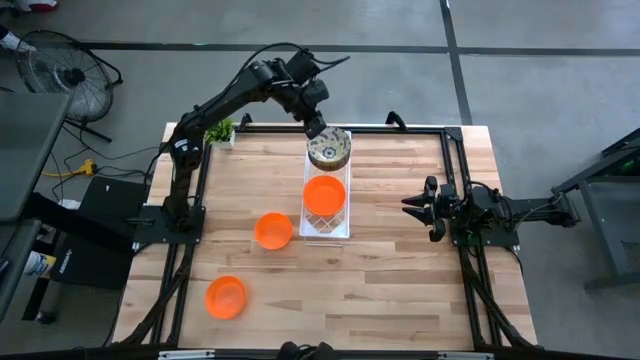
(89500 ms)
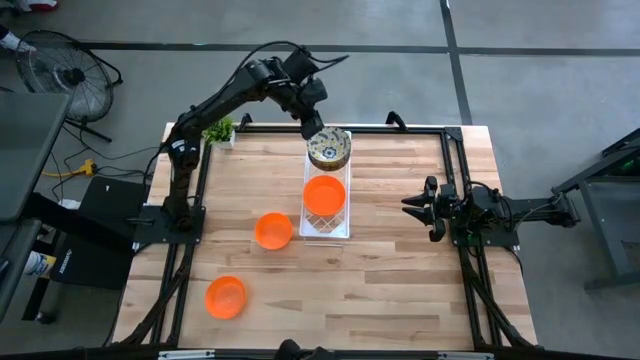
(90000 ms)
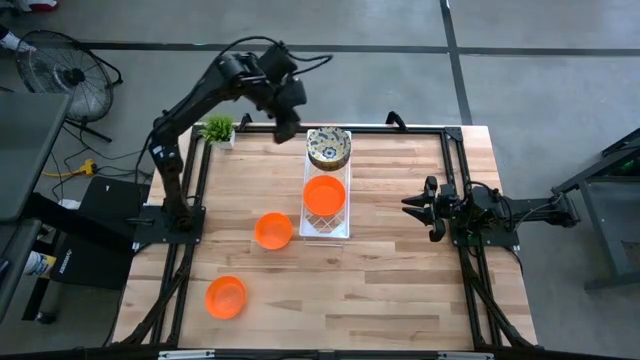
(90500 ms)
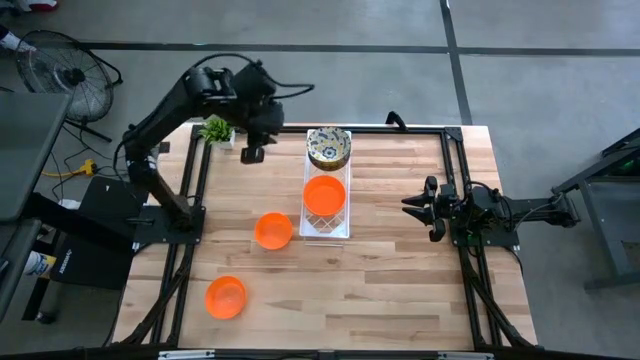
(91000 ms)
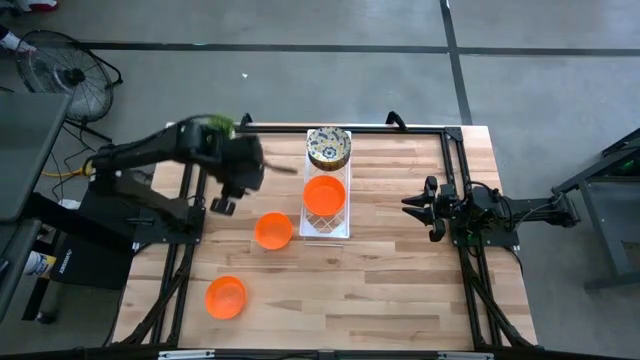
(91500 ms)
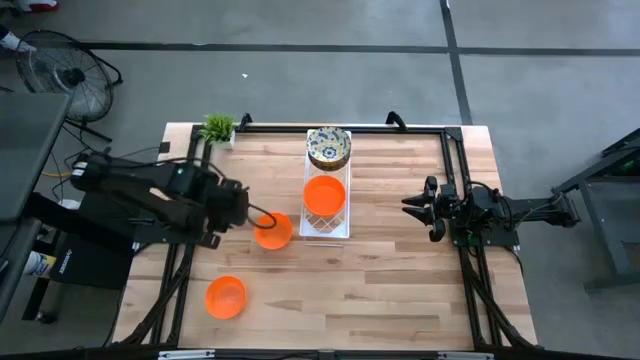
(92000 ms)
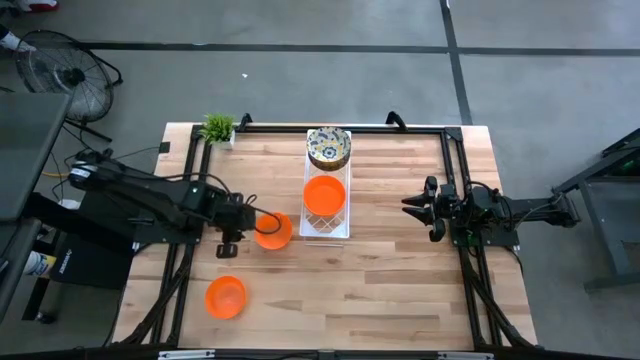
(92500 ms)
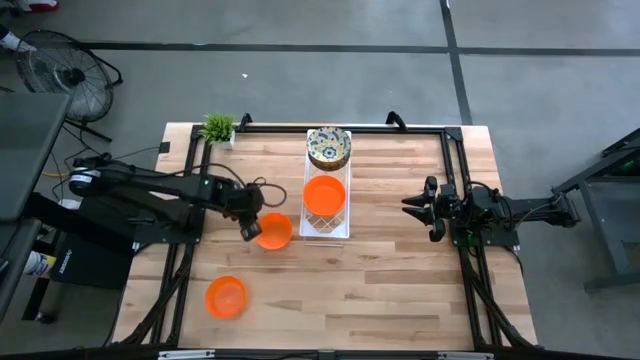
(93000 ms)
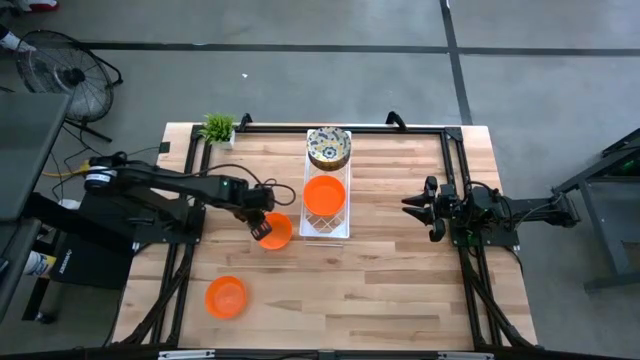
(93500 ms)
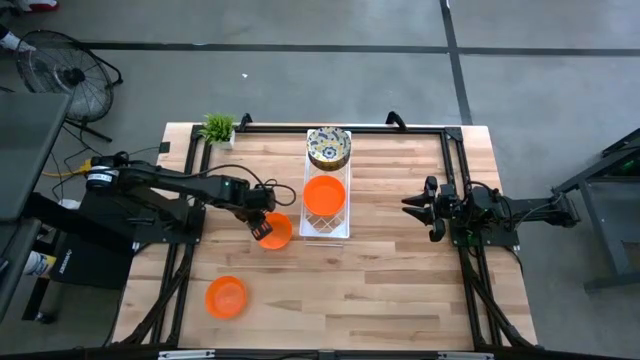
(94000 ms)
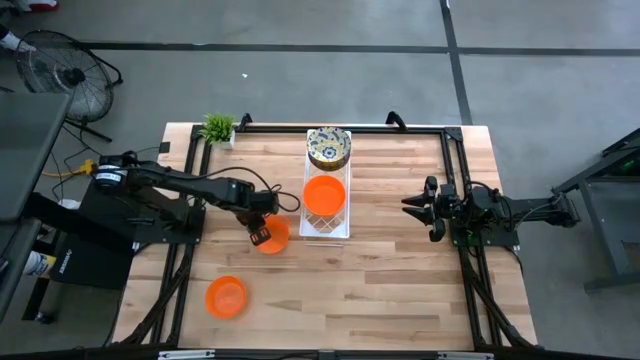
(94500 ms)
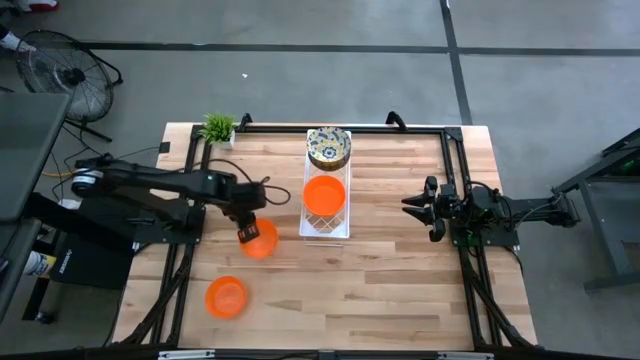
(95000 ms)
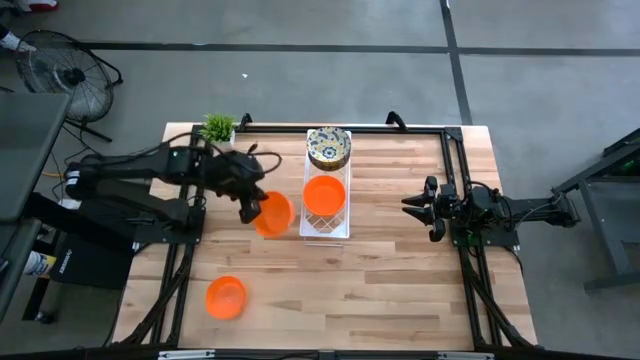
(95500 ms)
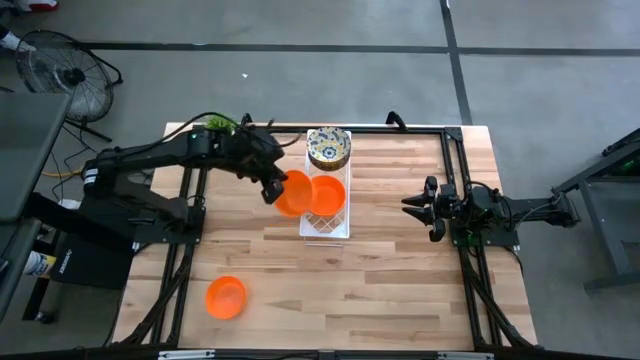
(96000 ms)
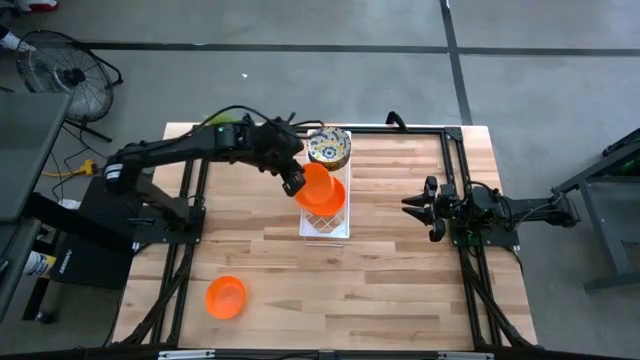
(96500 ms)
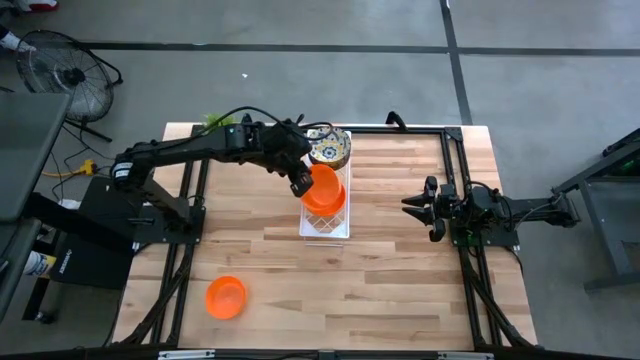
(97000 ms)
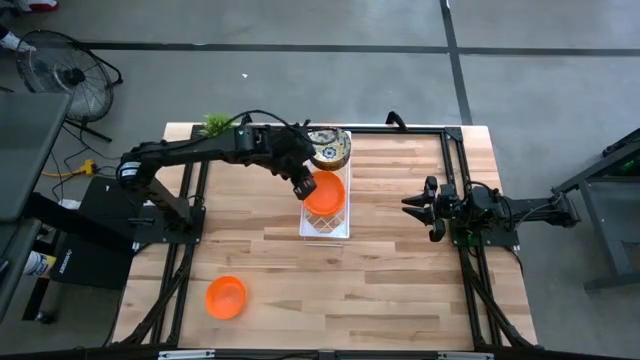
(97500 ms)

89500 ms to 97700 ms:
Task: Pick & Place Mini bowls
Stack the orange bowl on top of the orange bowl on the shelf

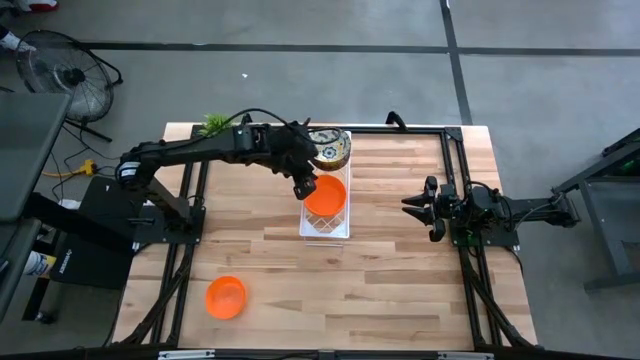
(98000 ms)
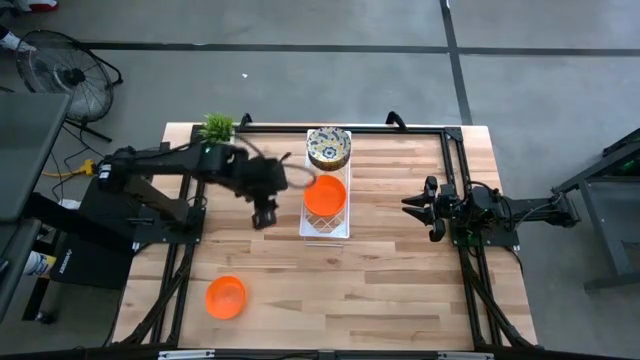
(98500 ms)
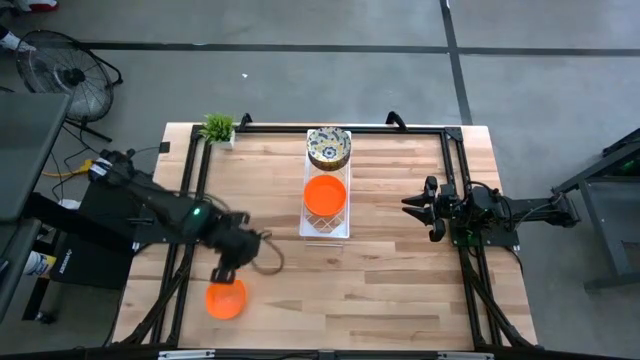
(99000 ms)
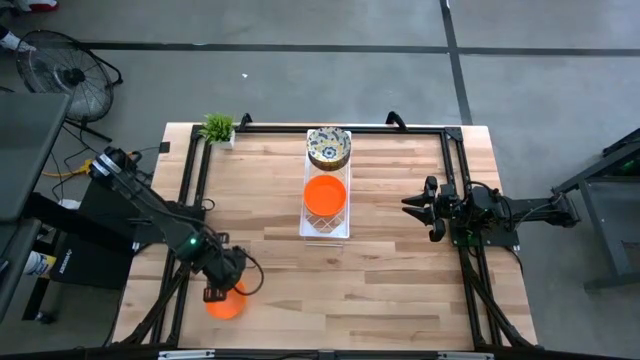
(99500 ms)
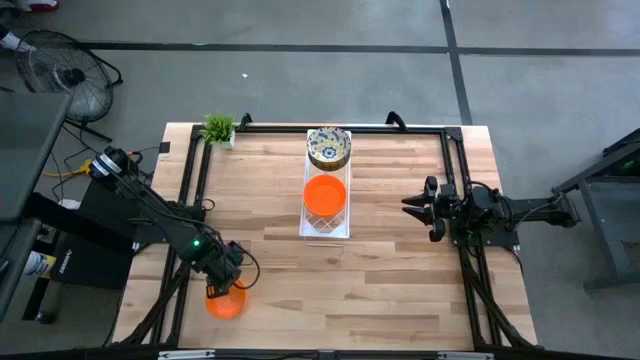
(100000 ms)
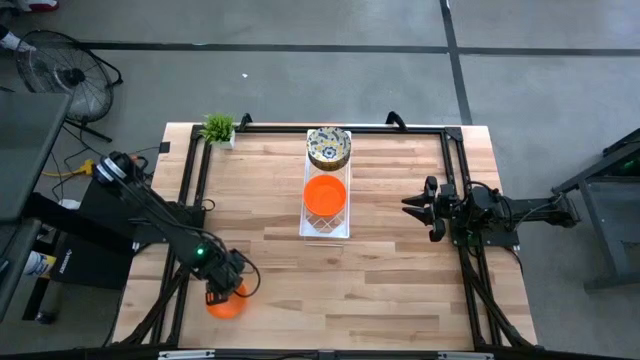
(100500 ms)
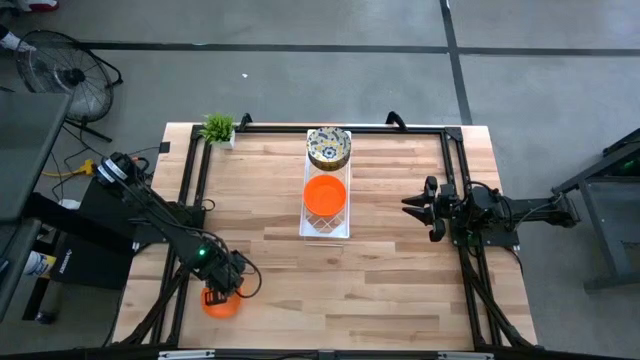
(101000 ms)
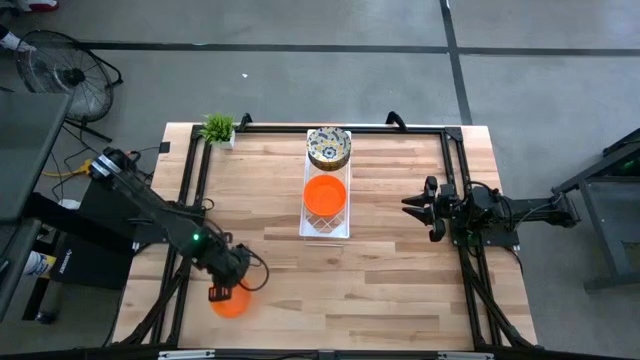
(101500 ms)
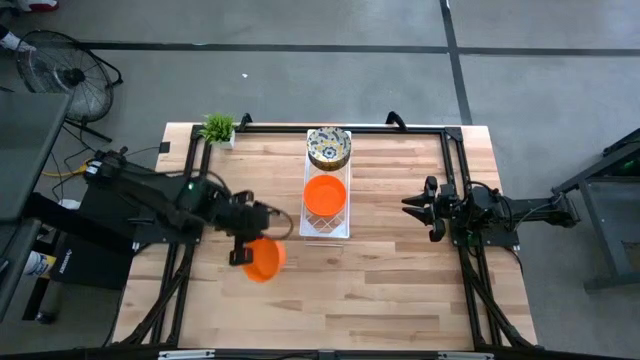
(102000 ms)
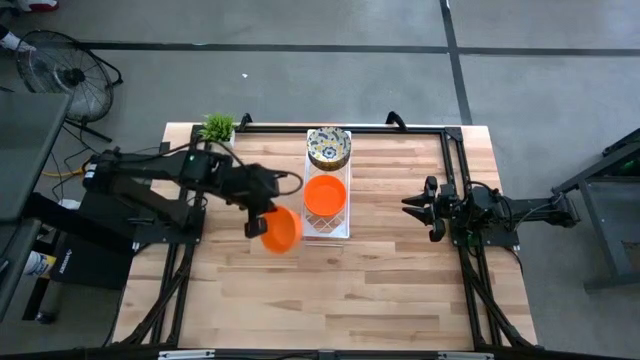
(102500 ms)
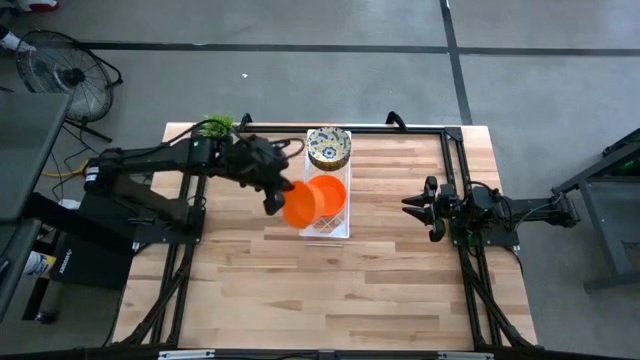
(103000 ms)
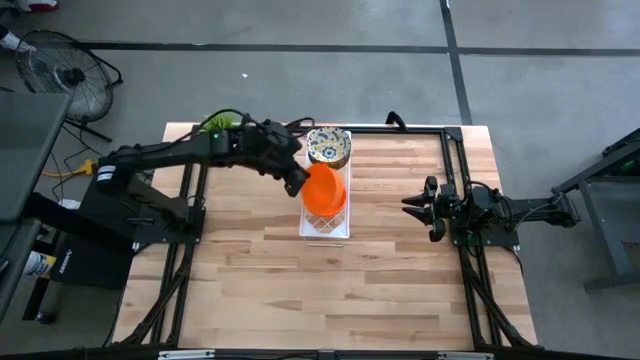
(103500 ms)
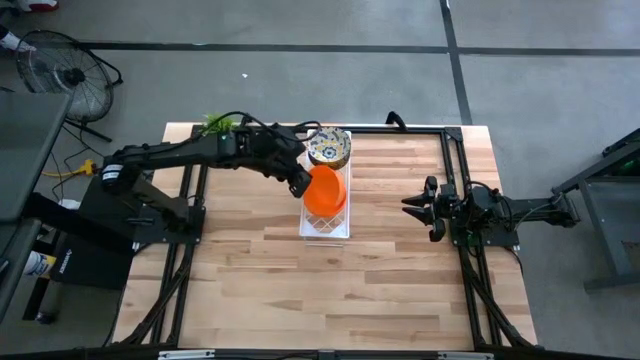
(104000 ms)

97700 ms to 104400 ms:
Stack the orange bowl on top of the orange bowl on the shelf

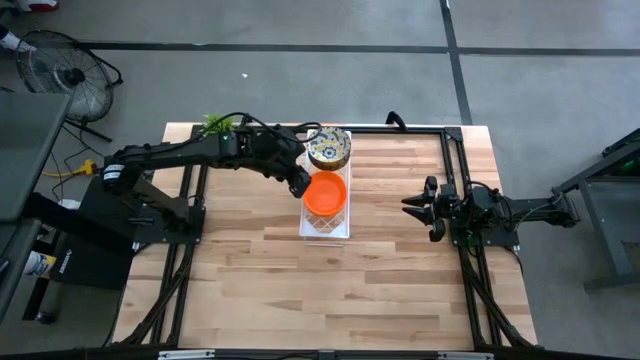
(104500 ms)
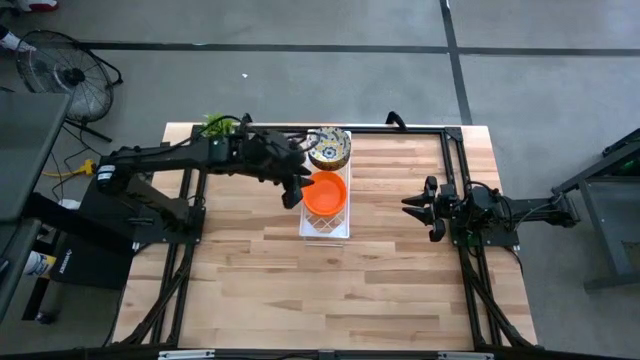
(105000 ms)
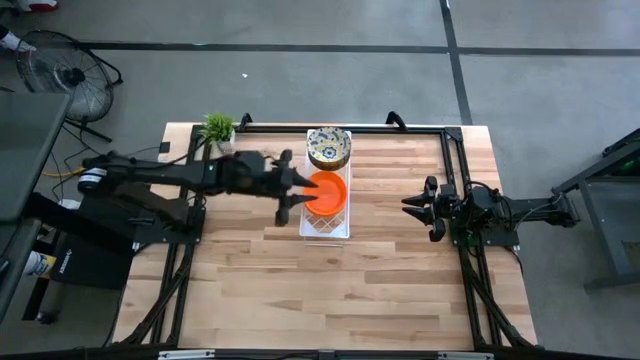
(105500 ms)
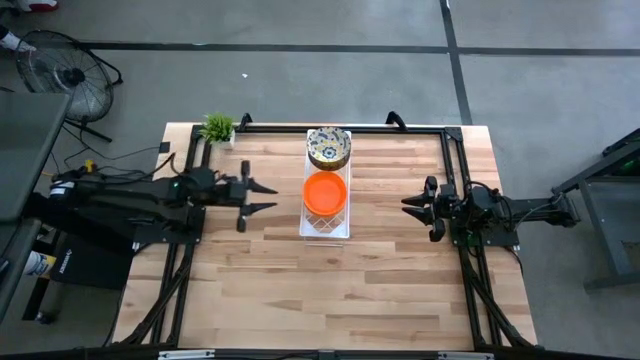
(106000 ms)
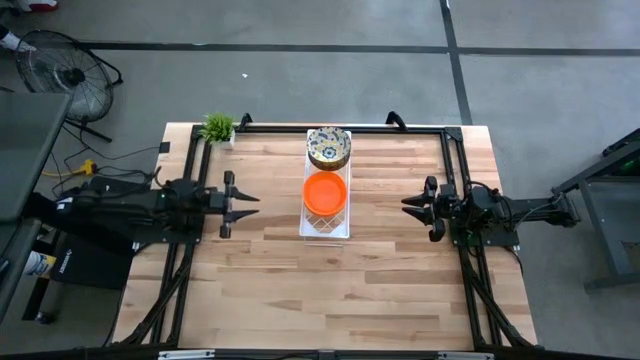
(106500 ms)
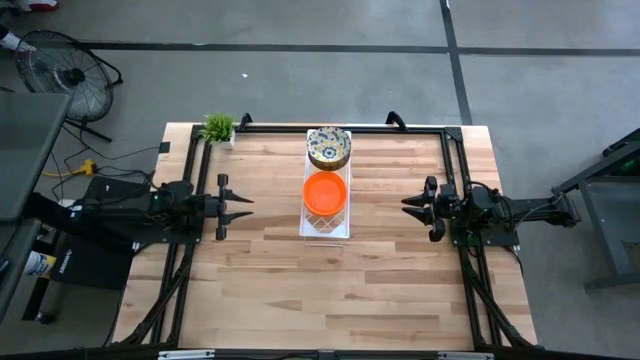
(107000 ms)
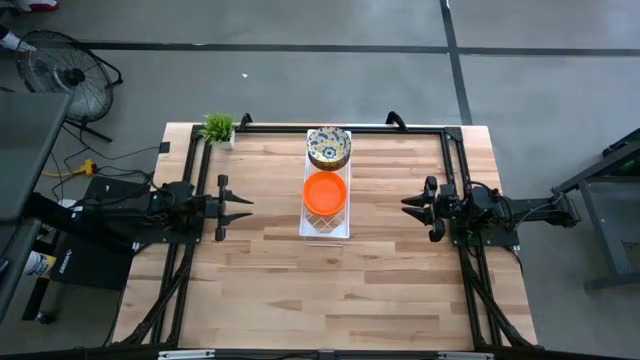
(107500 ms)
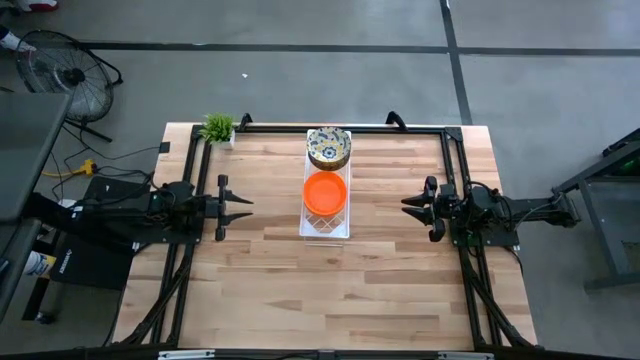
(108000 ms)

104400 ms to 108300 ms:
Return to Home Position

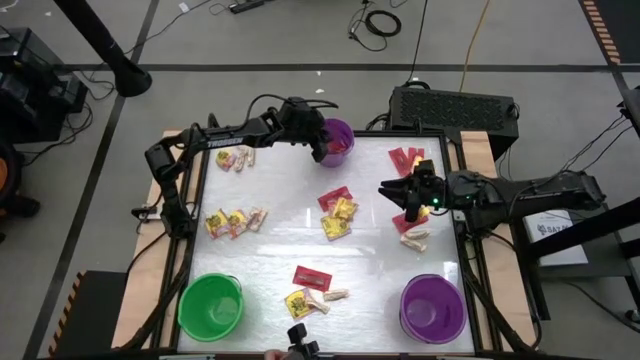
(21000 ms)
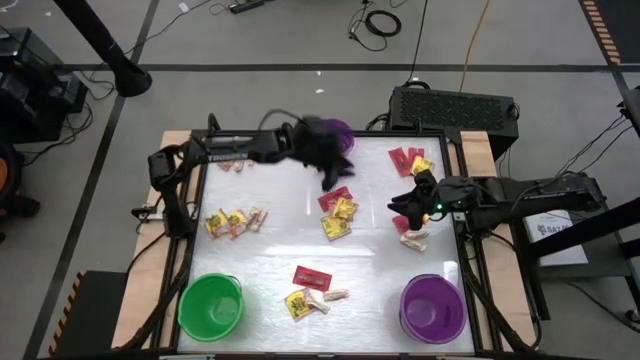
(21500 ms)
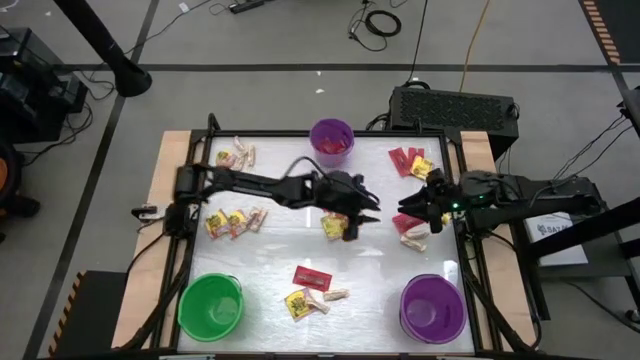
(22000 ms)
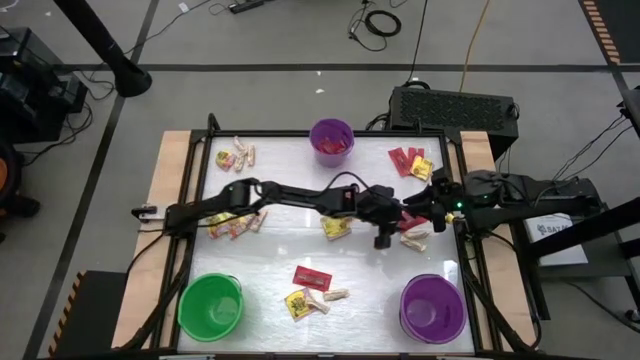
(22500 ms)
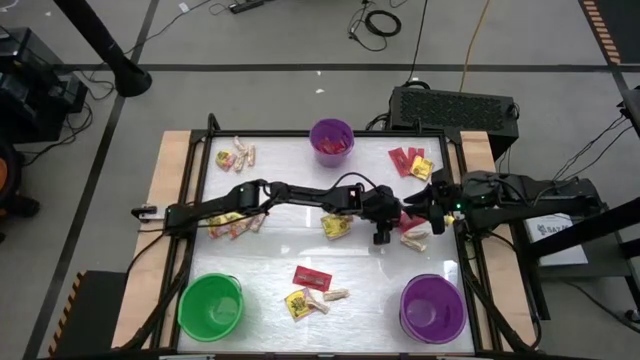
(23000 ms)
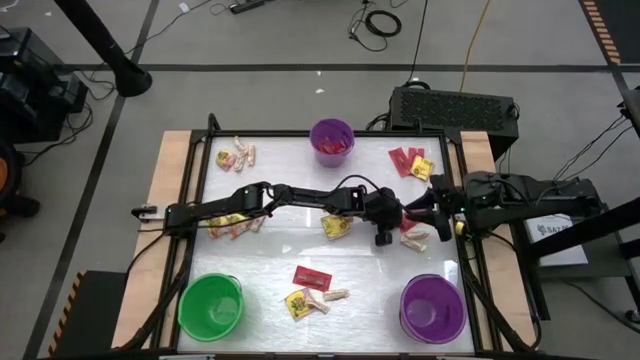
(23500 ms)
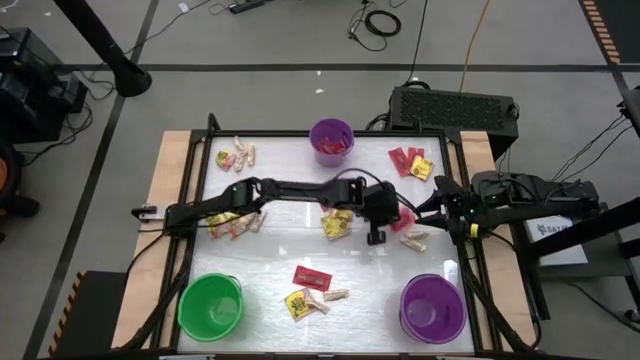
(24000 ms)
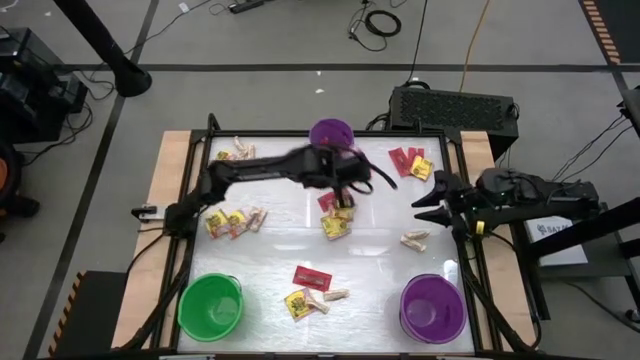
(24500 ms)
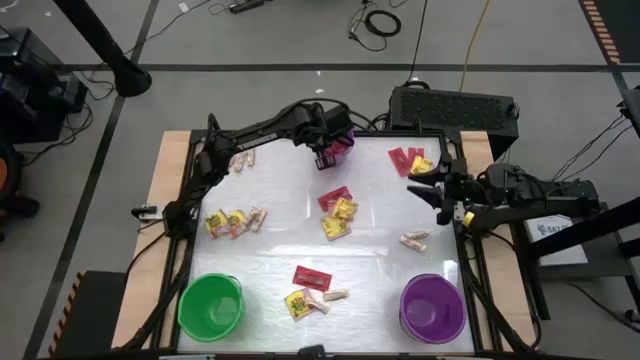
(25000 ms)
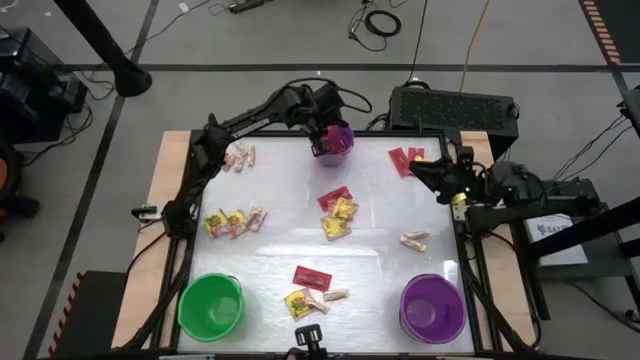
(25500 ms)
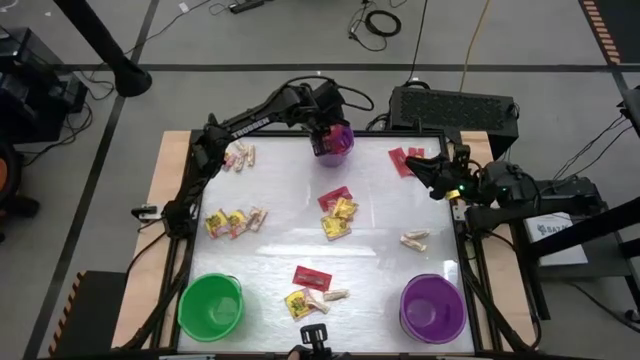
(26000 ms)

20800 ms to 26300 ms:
Task: Sort candy by brand, put in halloween buckets
Put the red candy into the top purple bucket
